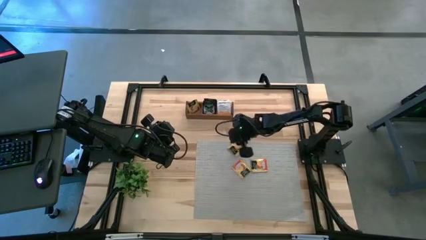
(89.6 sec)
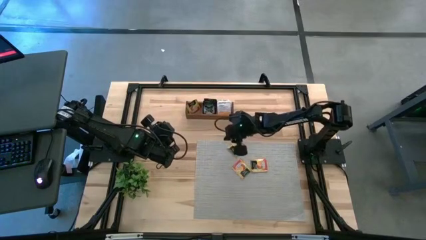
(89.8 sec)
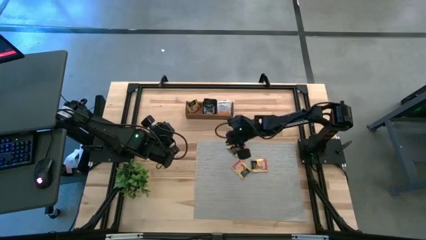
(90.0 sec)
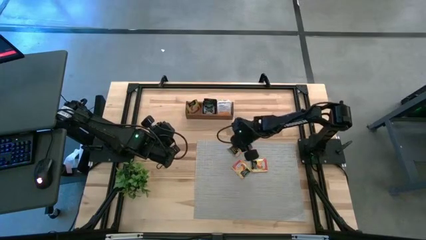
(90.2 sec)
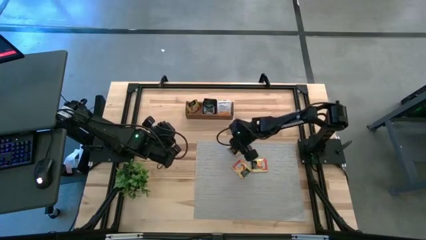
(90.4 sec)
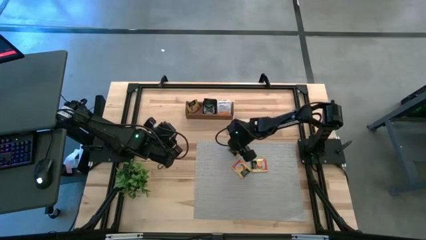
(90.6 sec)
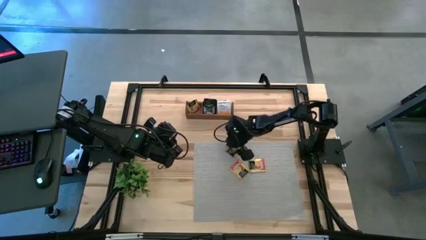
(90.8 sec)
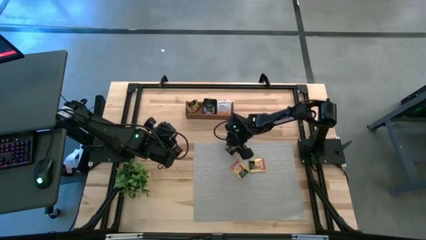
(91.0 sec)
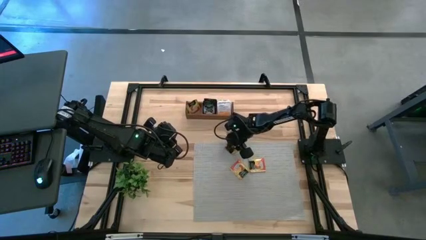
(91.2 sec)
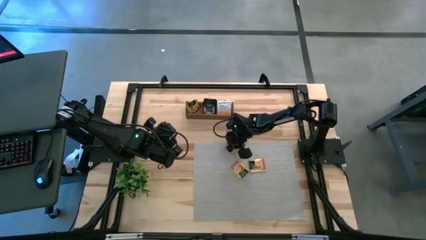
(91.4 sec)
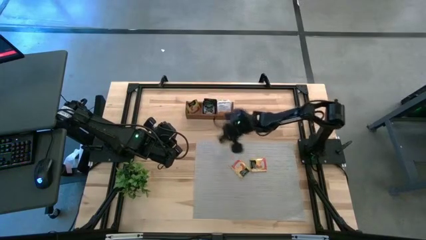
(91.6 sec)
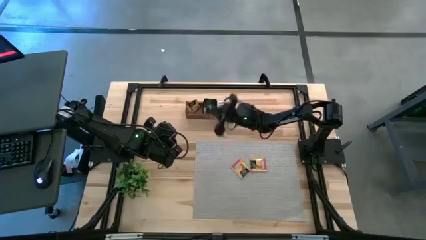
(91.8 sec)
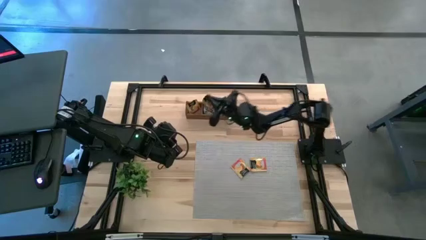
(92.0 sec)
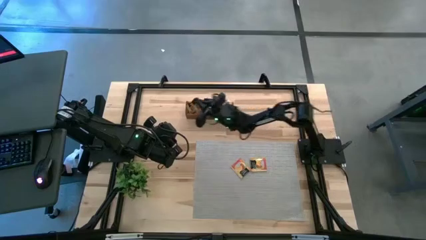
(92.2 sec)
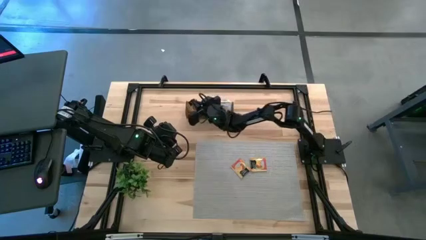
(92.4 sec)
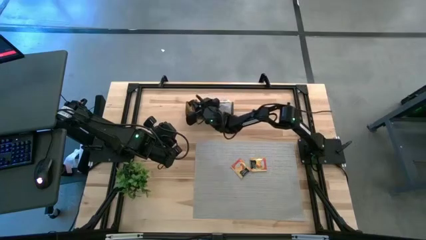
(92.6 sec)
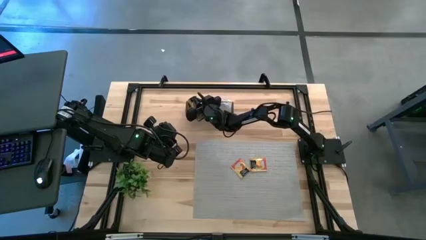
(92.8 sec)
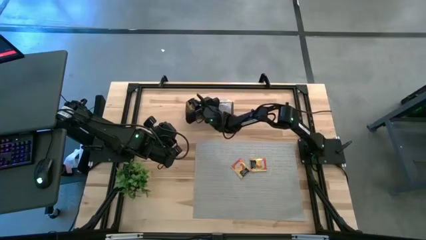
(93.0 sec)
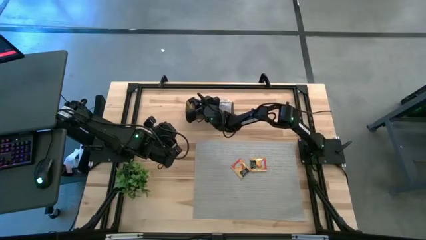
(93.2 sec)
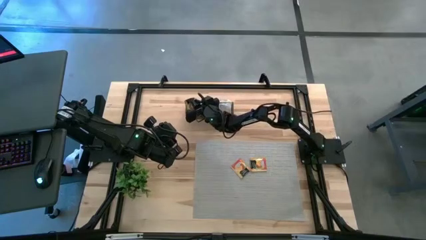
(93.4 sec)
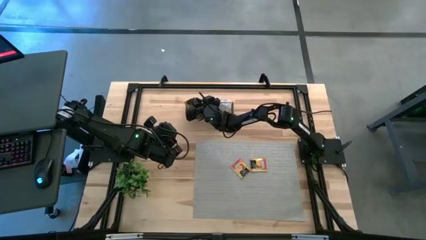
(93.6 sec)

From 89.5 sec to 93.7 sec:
Task: Pick & Place Tea
Put the orange tea bag into the left section of the wooden organizer

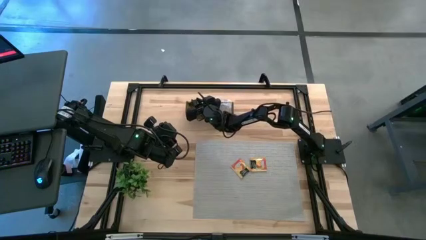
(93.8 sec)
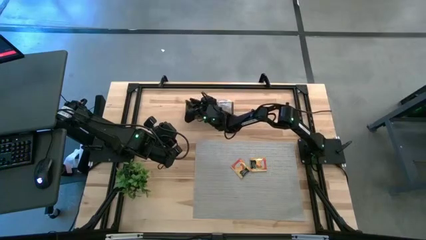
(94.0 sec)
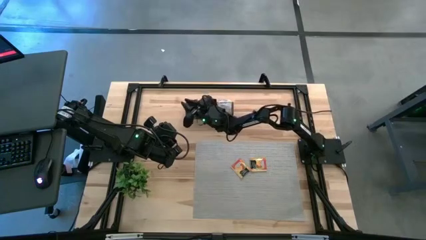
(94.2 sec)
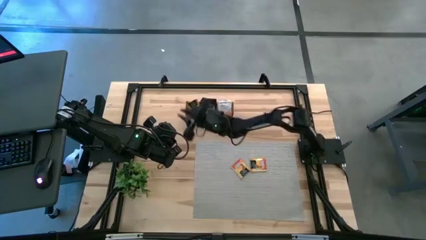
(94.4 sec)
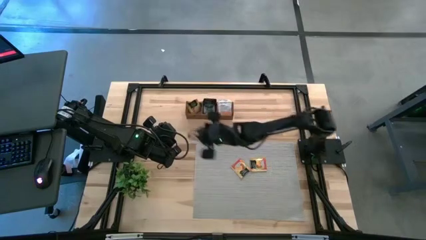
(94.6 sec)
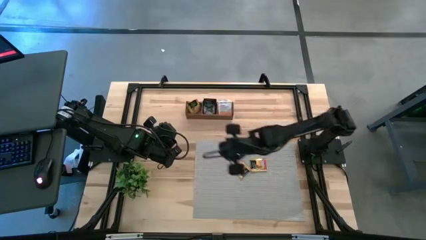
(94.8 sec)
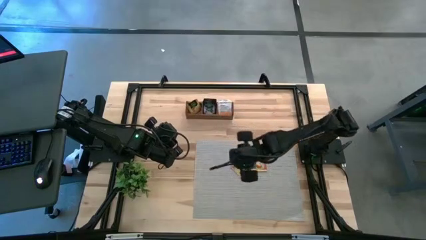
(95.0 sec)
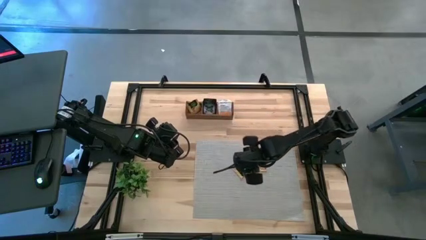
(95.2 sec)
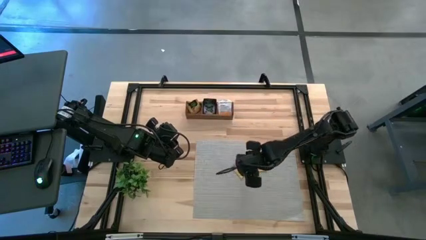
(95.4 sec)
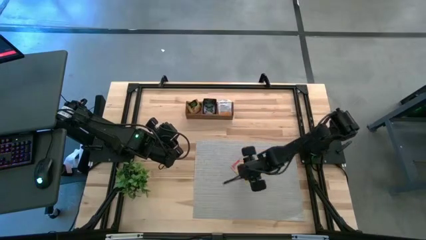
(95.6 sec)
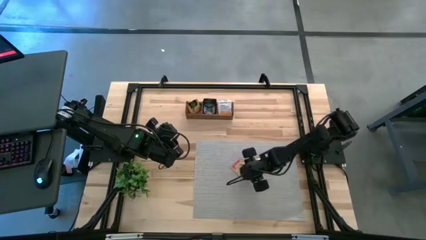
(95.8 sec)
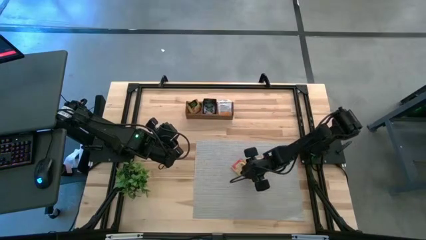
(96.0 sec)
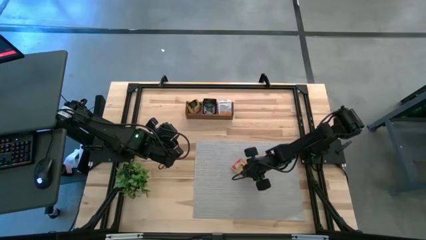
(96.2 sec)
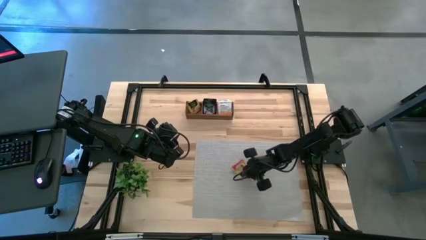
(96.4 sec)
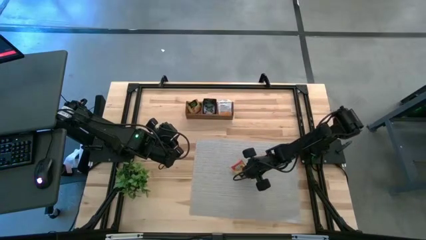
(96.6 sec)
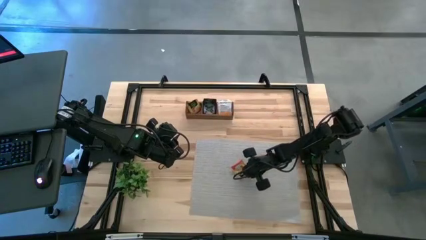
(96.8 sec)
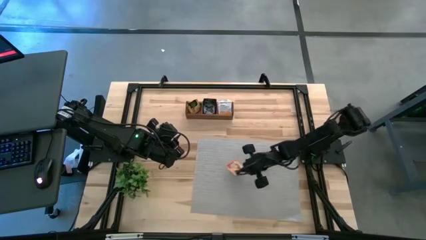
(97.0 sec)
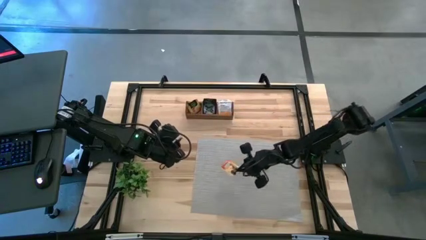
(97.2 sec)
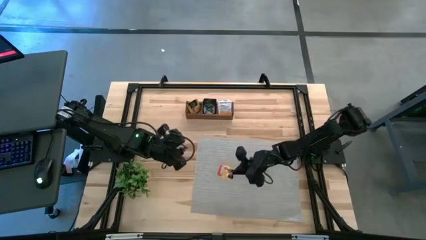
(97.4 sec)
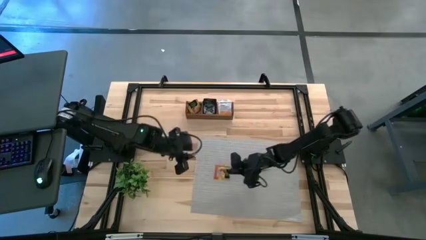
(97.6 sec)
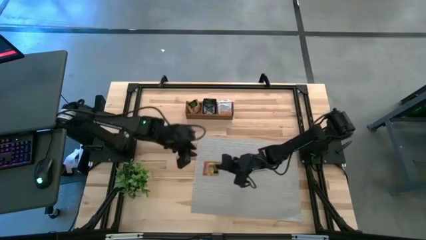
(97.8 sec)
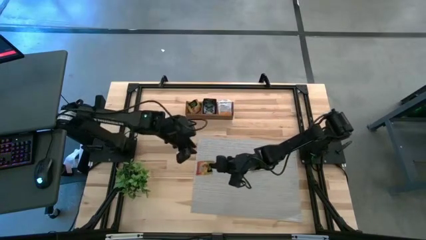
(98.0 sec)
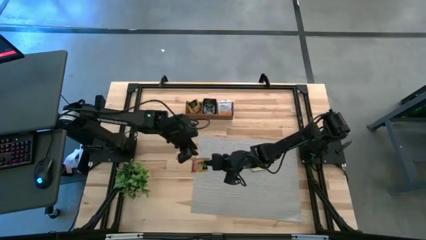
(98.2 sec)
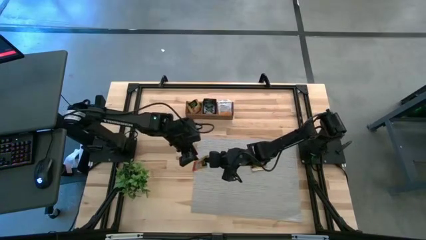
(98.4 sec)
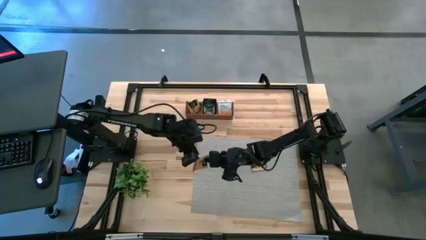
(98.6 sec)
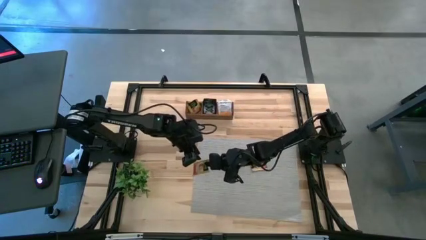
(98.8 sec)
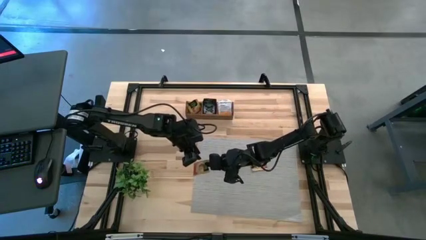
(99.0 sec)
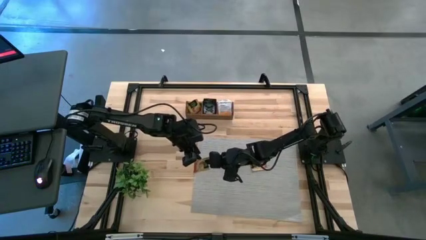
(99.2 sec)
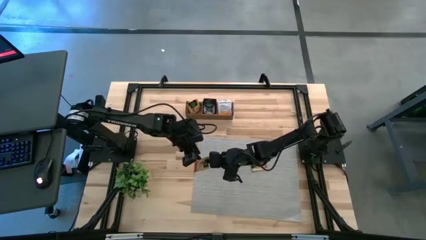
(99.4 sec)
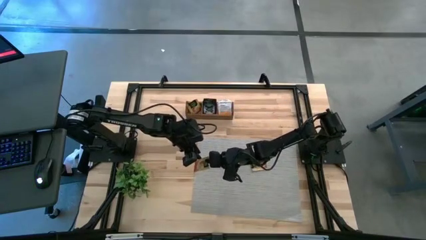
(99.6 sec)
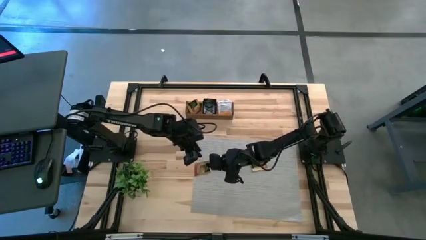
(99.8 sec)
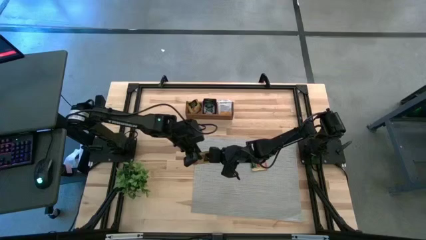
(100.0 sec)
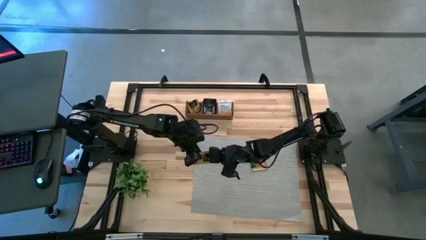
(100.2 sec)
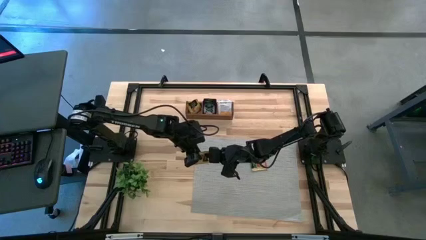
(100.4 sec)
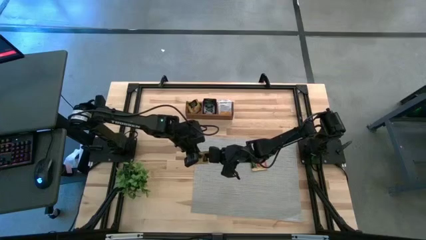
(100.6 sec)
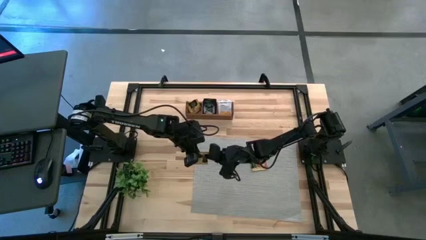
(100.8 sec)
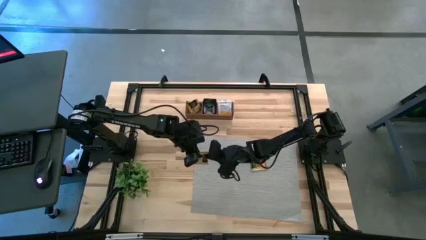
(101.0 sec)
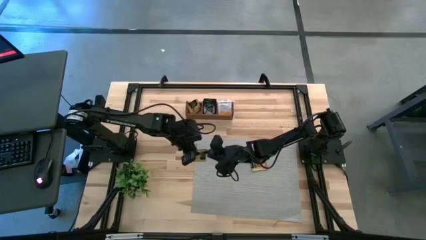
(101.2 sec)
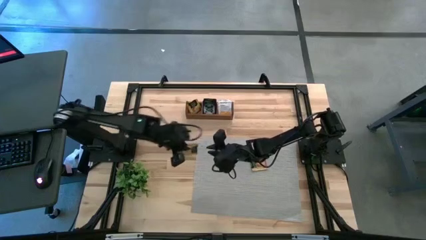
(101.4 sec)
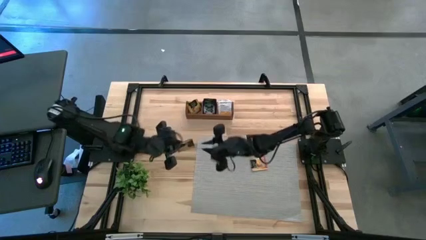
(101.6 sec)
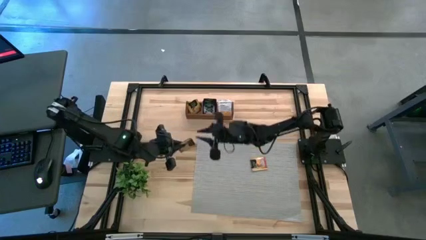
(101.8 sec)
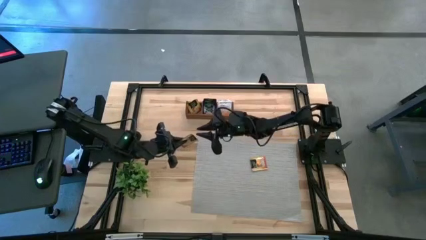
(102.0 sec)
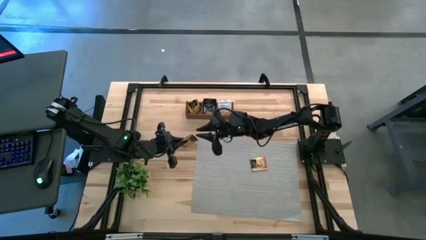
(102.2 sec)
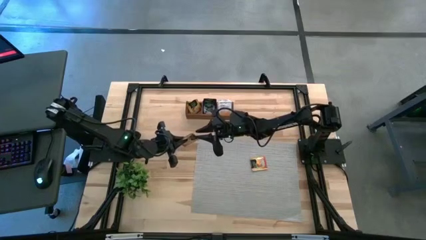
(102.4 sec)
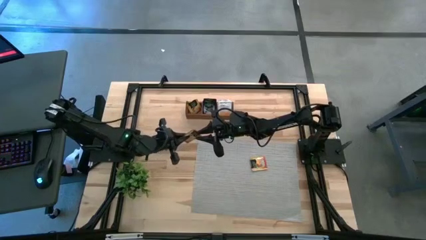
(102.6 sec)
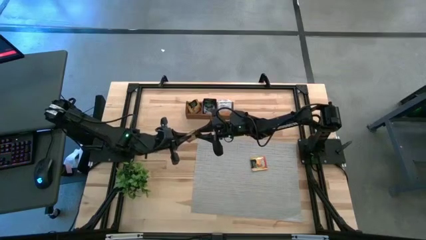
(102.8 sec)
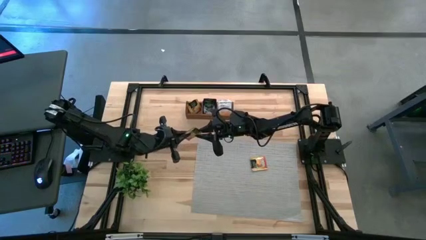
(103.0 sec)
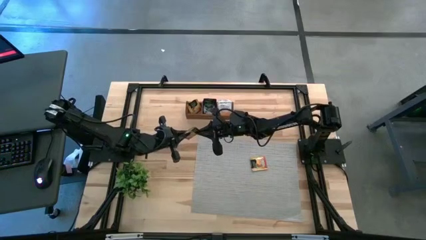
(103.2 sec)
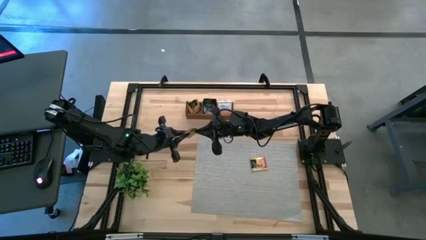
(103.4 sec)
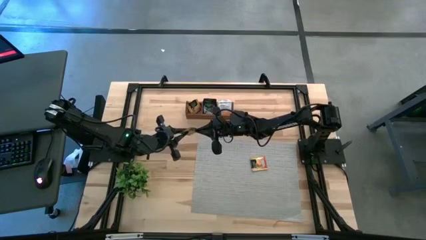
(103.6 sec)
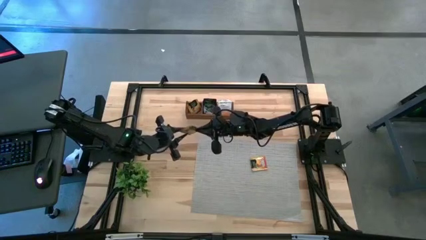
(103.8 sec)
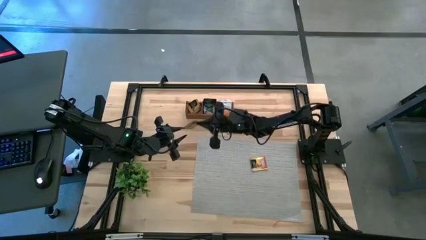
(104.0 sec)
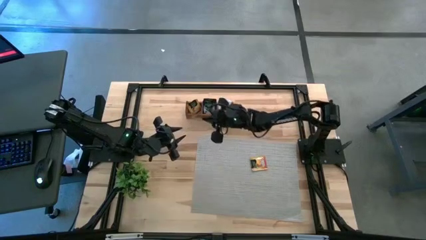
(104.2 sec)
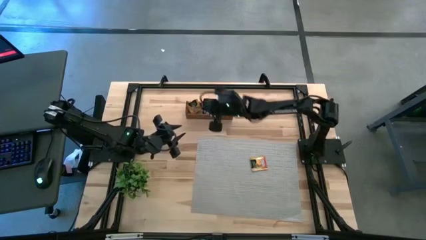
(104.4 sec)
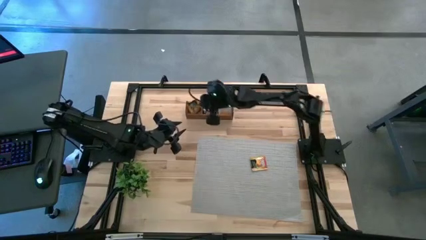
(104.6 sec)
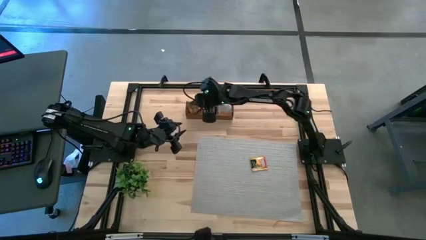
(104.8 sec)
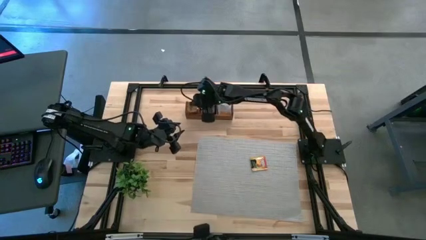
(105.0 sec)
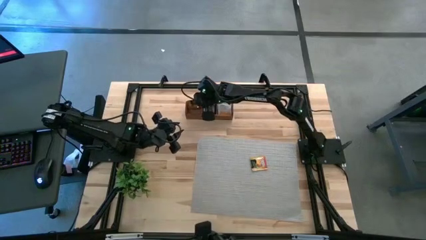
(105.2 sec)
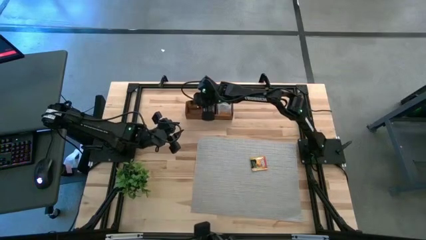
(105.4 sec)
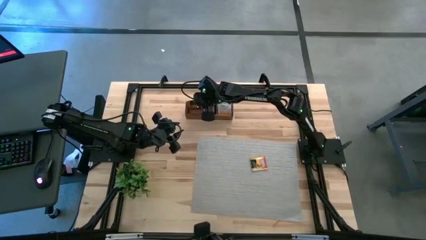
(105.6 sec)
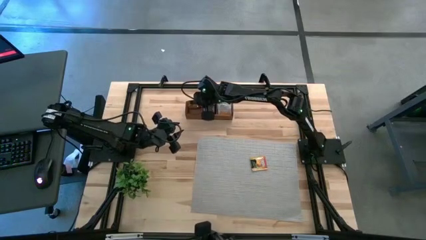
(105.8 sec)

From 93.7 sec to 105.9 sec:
Put the orange tea bag into the left section of the wooden organizer
